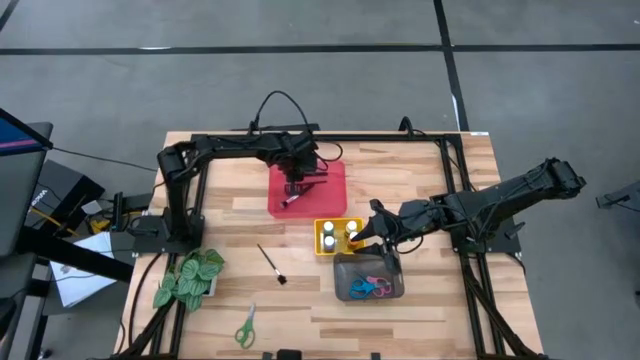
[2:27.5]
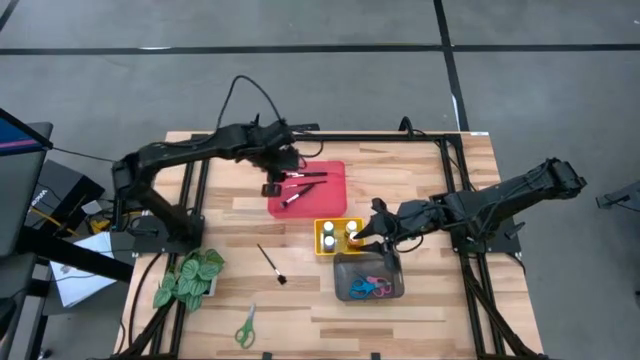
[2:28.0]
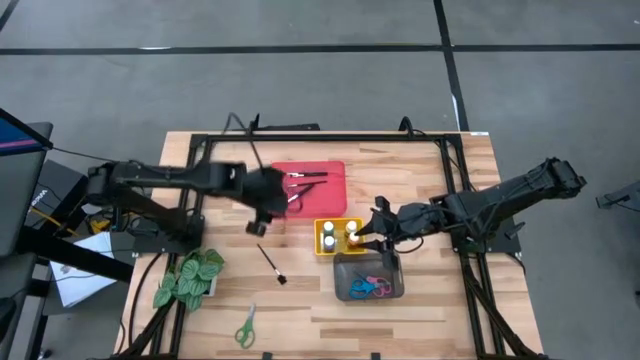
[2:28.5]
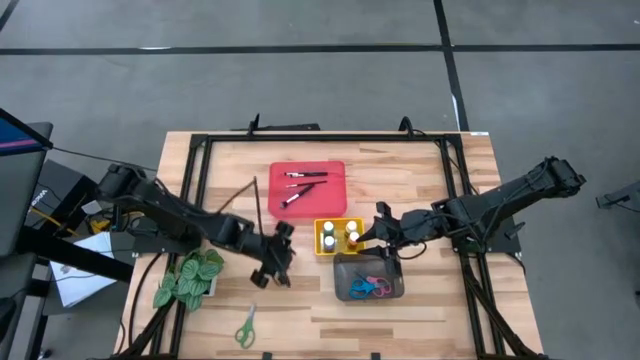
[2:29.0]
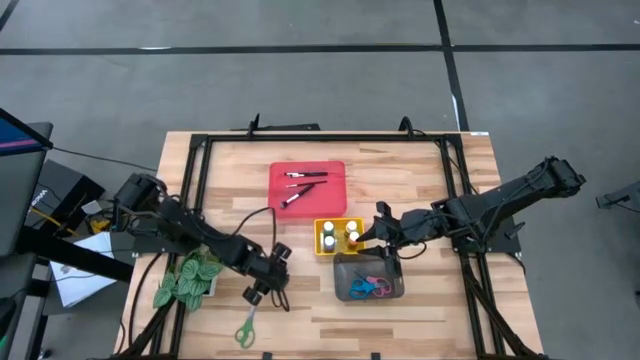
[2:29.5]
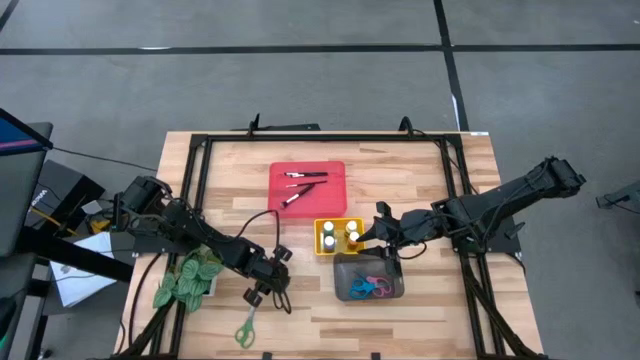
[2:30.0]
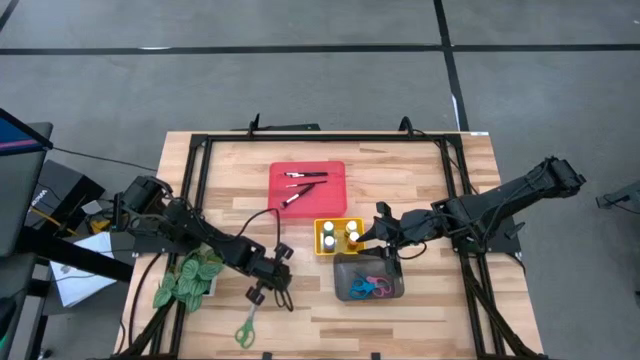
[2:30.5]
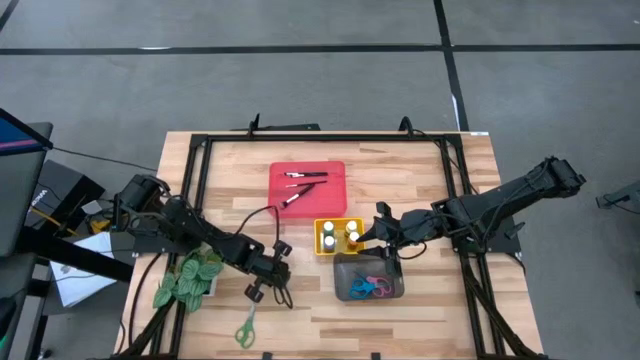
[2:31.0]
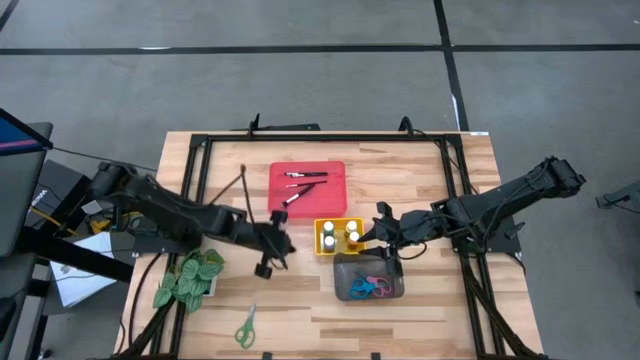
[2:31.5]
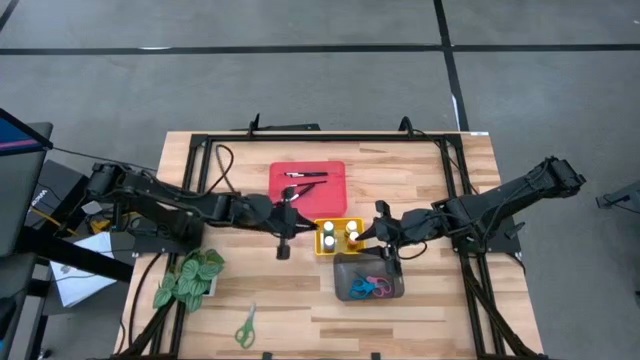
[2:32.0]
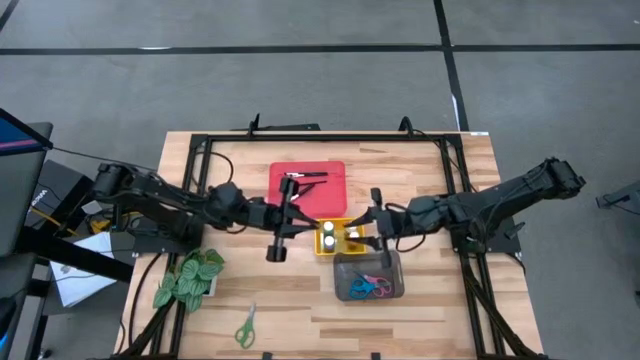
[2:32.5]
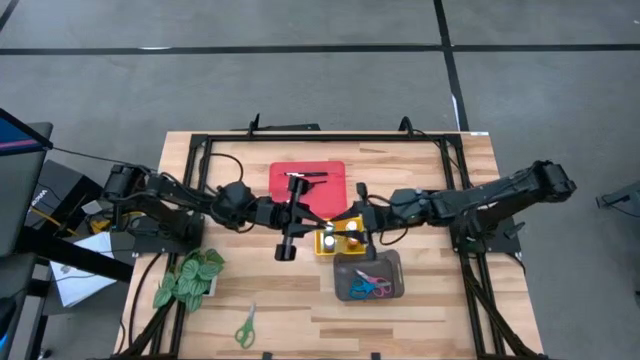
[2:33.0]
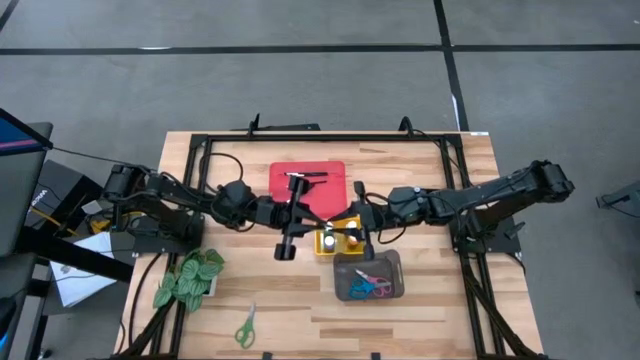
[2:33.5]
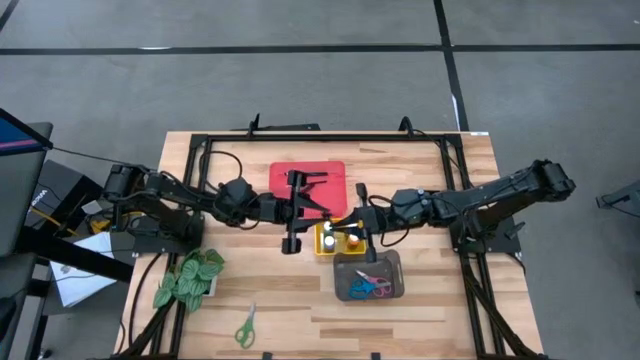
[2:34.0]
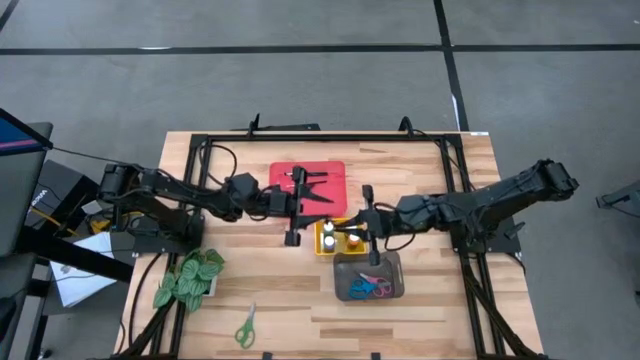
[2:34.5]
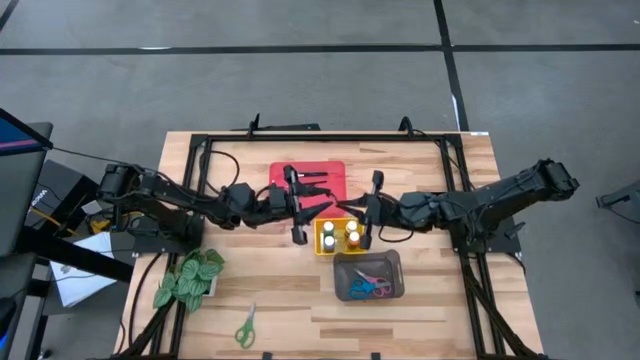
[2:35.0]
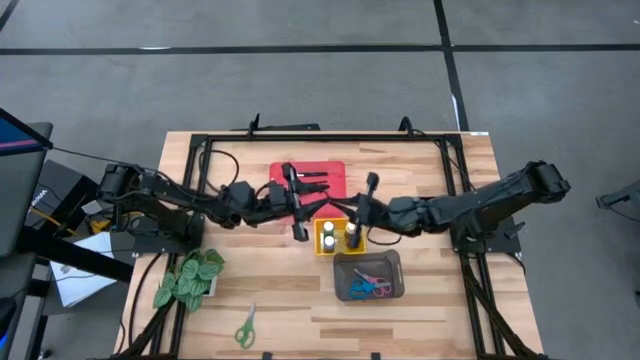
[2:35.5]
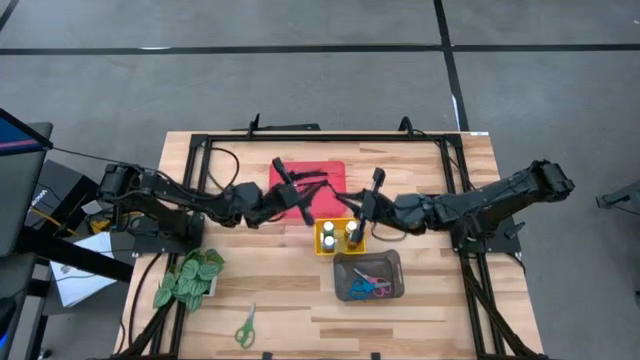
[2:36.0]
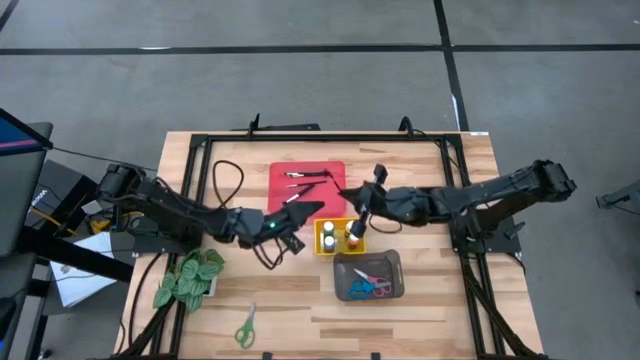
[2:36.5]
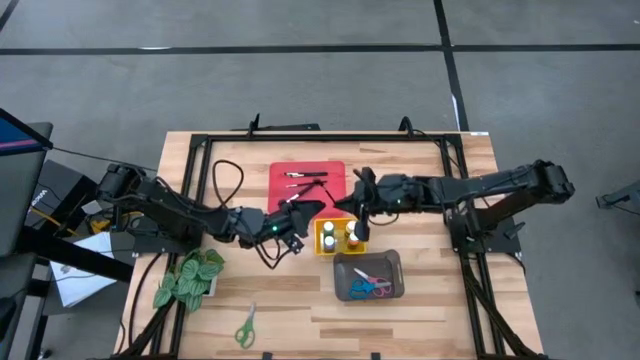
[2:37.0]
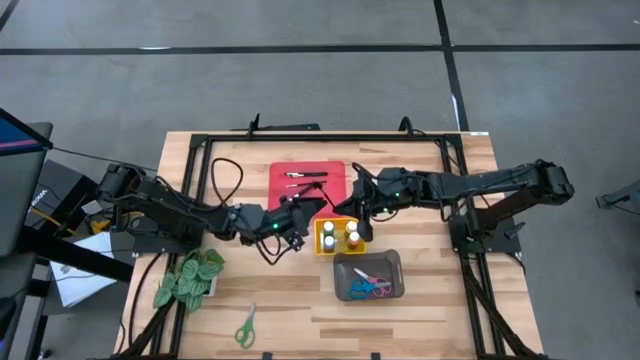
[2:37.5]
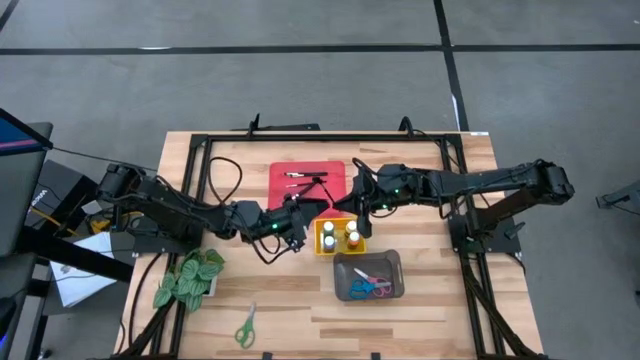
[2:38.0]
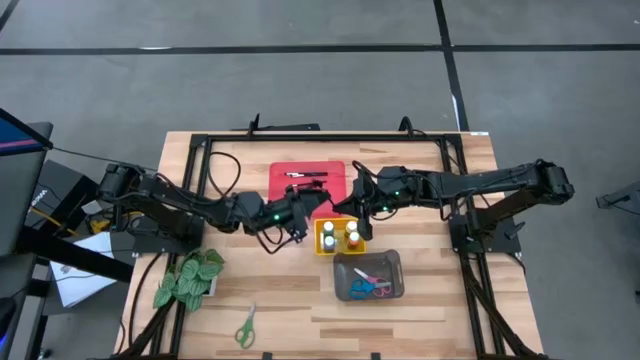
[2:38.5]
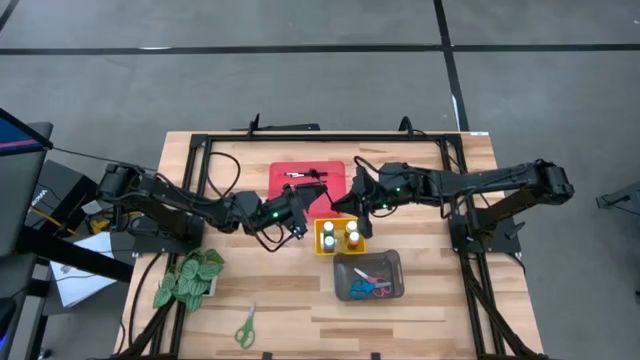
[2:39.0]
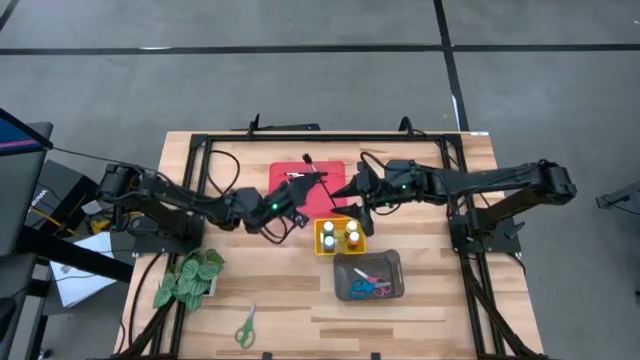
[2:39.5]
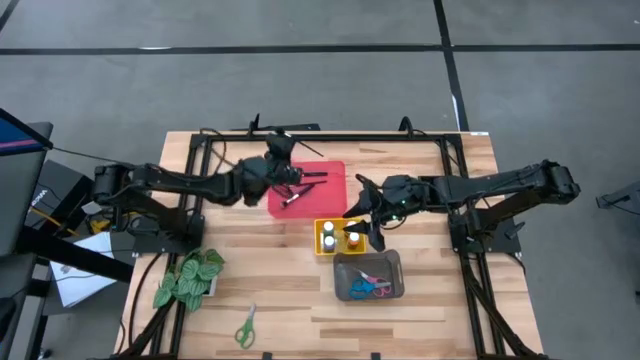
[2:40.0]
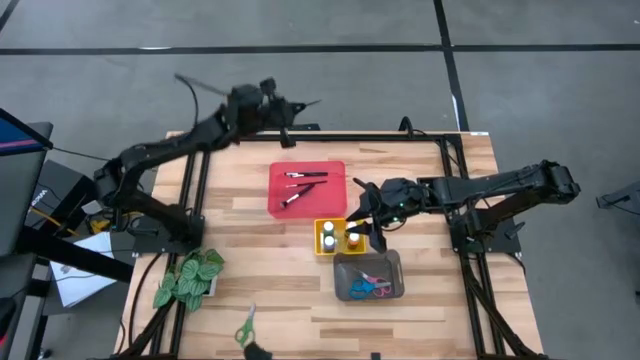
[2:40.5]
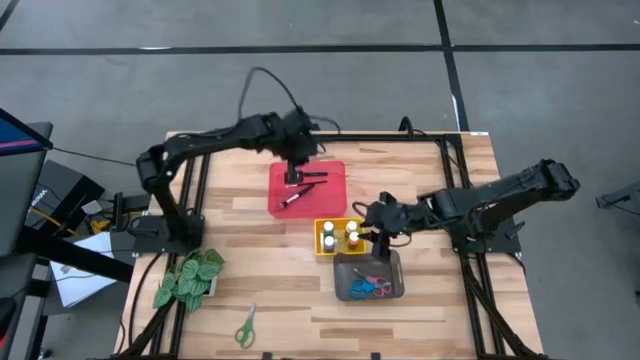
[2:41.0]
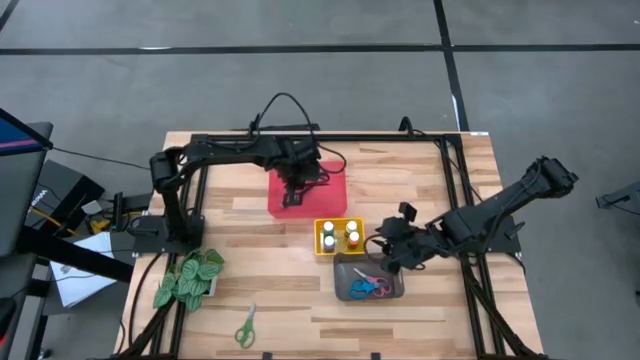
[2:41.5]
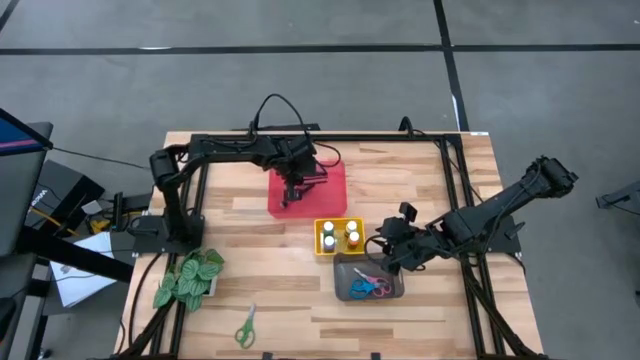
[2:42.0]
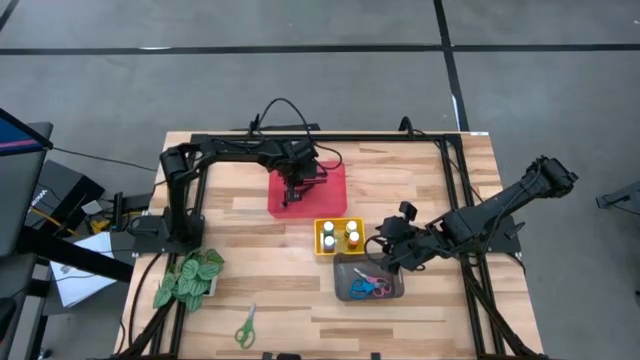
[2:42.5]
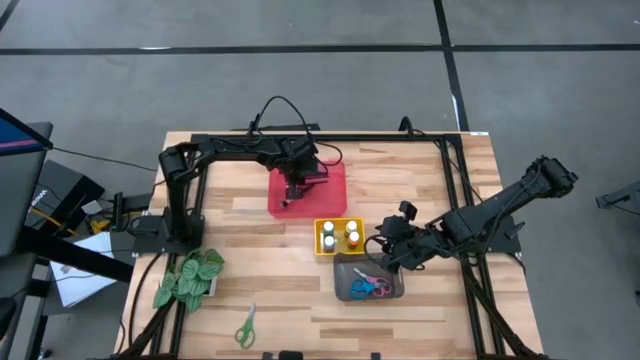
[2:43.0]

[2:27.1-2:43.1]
Task: Pick & Place Paint Supplies
Put the brow brush into the red bin

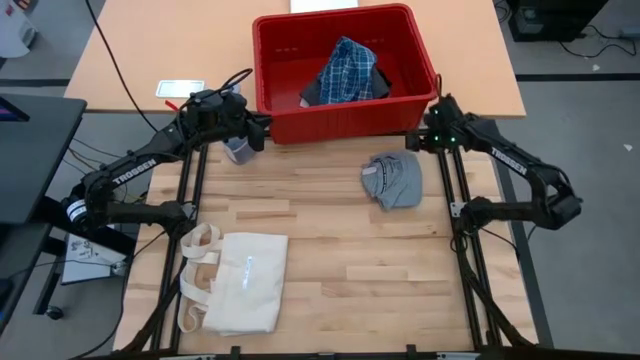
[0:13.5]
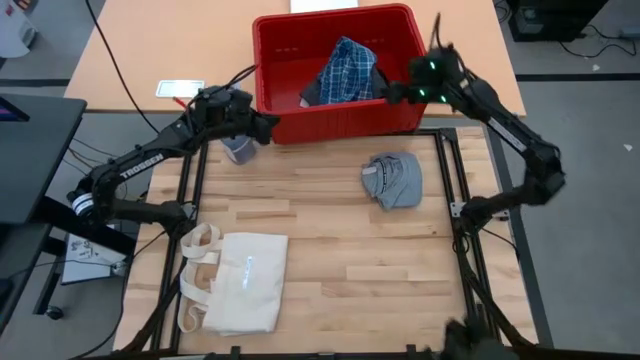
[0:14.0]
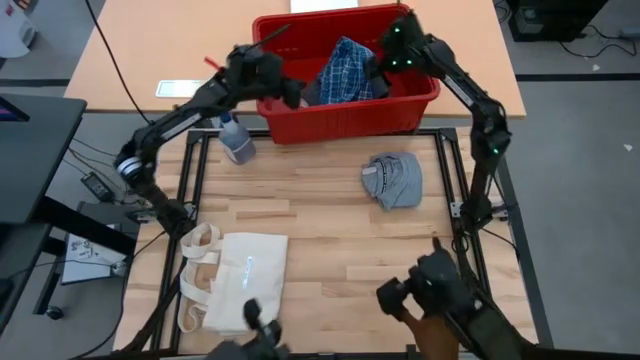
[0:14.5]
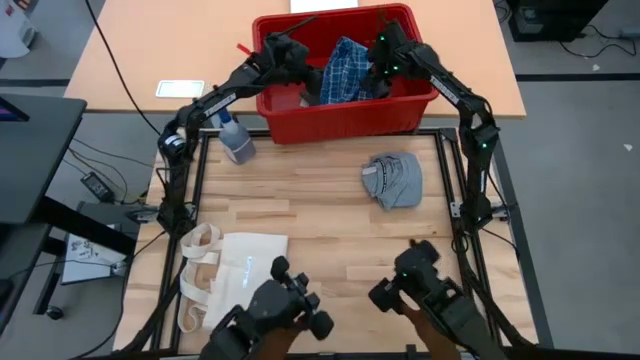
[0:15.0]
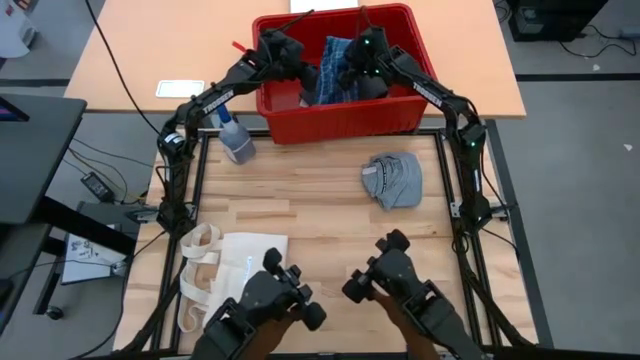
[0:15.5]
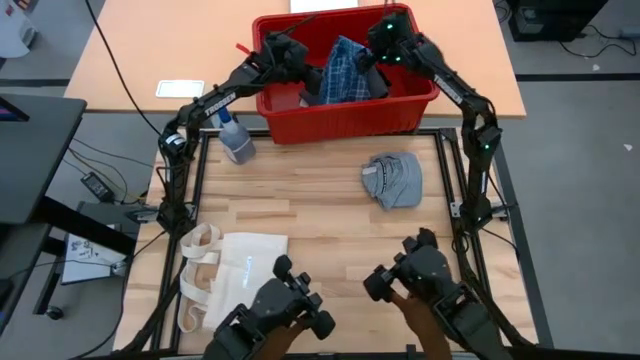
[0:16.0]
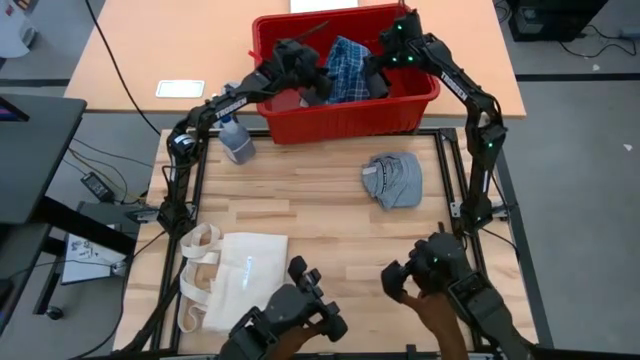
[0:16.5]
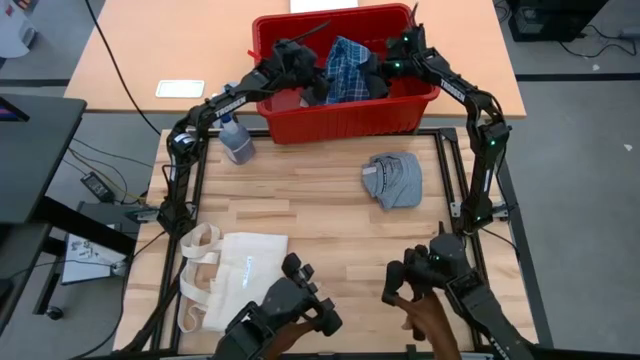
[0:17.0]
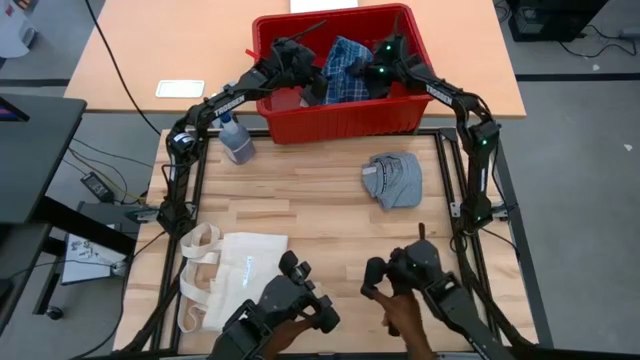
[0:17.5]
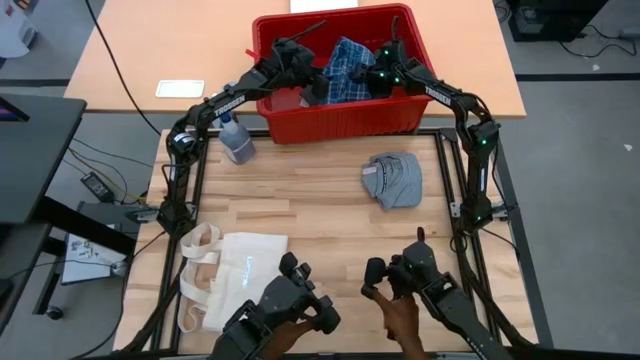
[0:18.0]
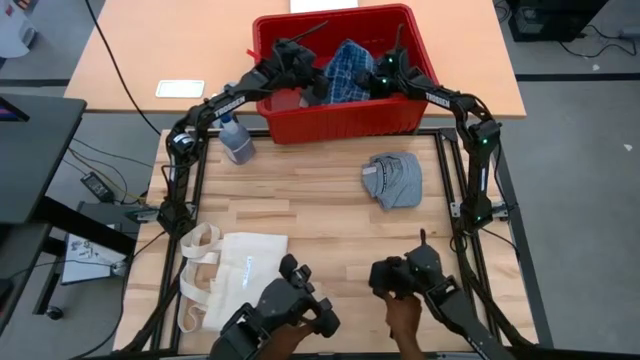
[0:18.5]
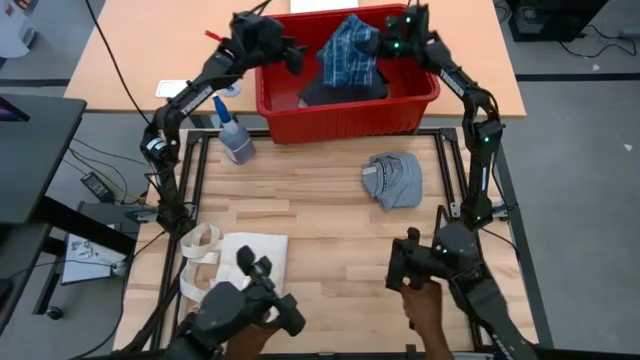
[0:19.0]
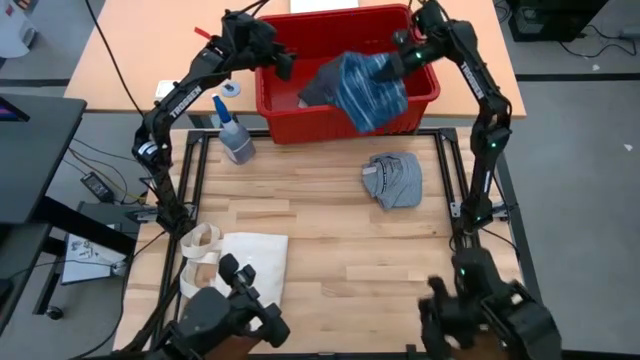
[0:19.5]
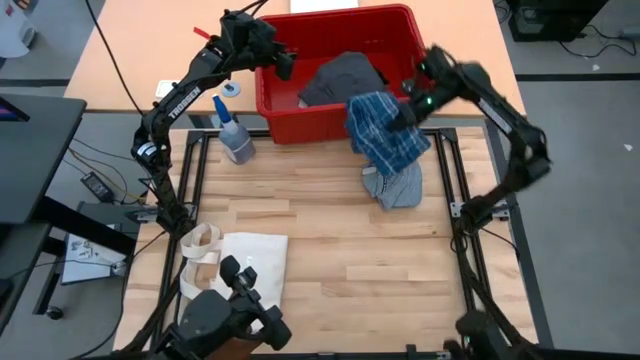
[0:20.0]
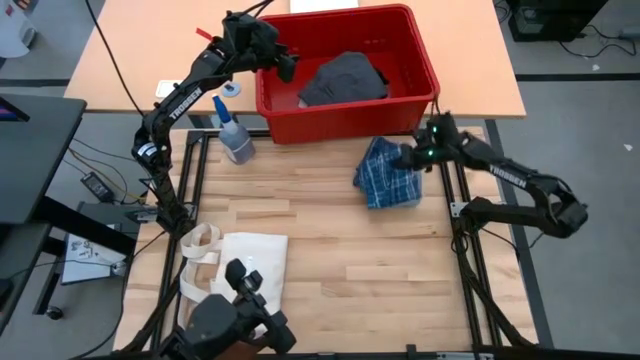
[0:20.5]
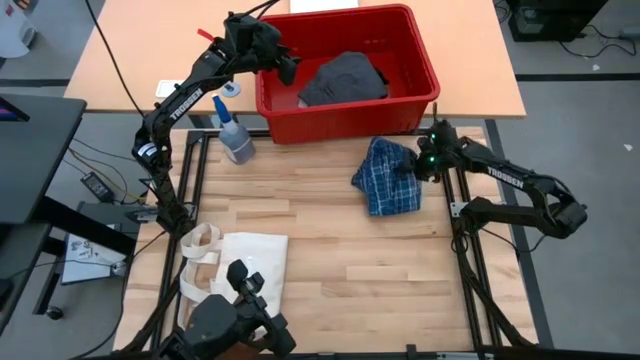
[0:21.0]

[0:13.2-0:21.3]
Task: Fold laundry
Remove the folded blue checkered polo shirt from the red bin
